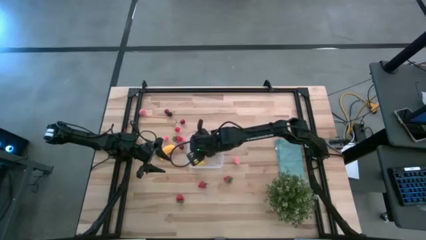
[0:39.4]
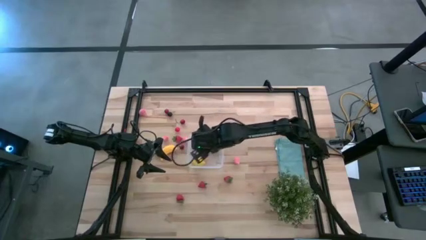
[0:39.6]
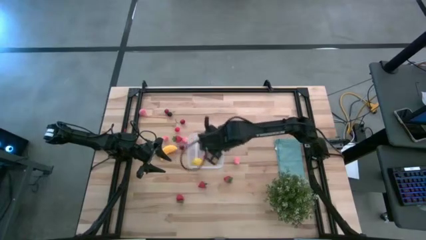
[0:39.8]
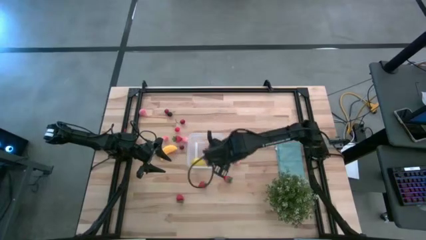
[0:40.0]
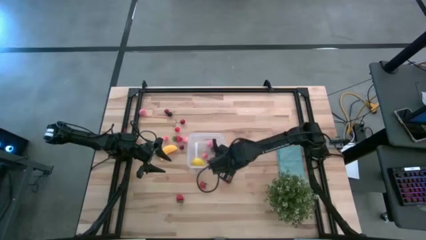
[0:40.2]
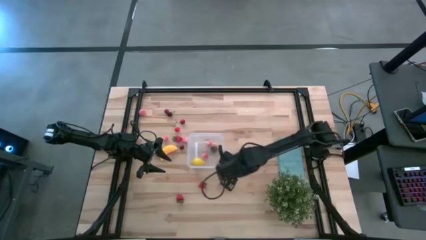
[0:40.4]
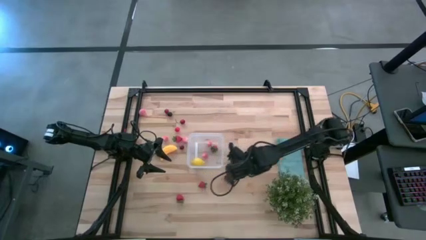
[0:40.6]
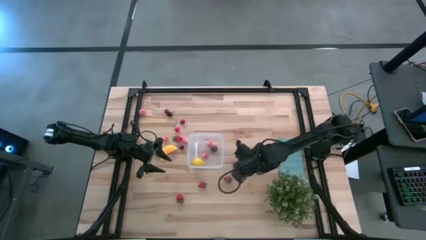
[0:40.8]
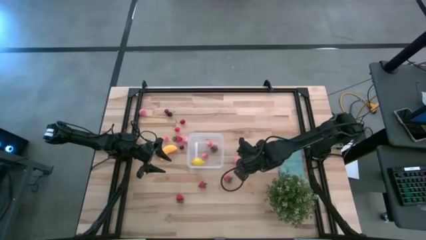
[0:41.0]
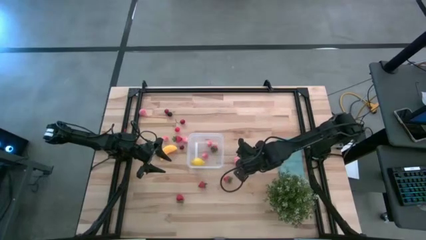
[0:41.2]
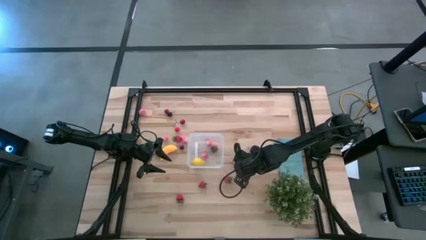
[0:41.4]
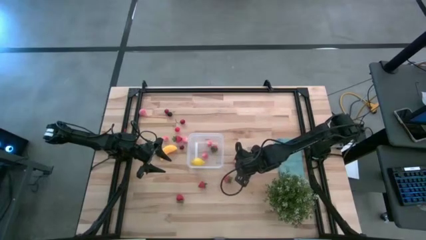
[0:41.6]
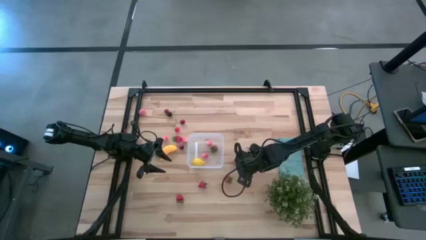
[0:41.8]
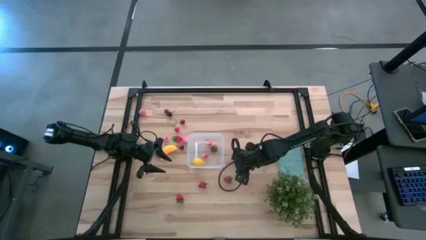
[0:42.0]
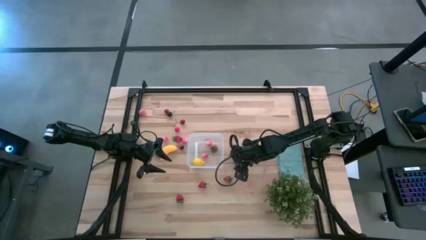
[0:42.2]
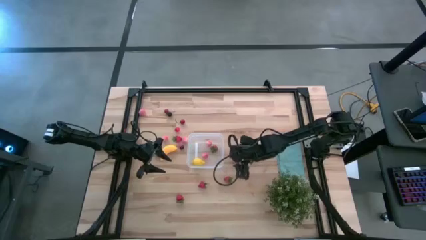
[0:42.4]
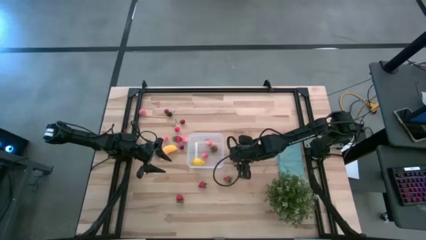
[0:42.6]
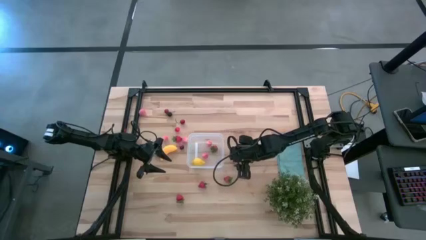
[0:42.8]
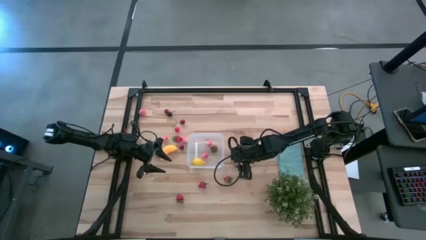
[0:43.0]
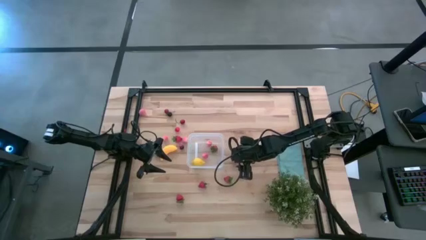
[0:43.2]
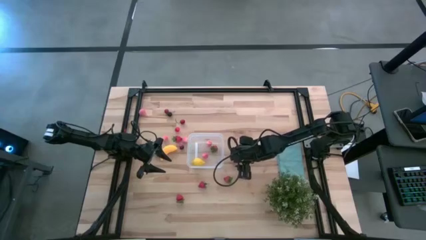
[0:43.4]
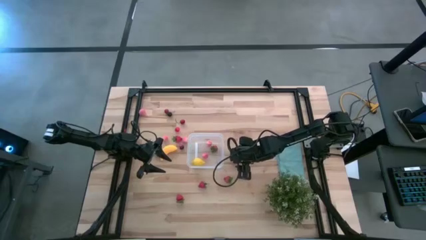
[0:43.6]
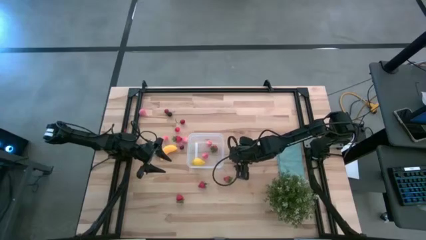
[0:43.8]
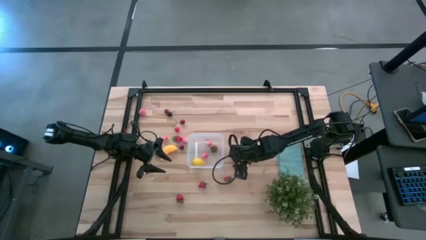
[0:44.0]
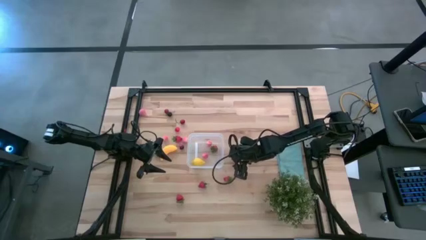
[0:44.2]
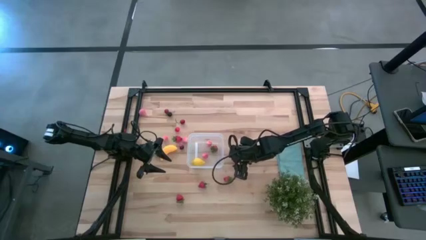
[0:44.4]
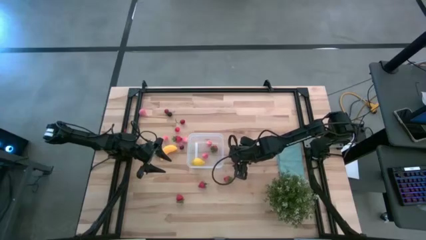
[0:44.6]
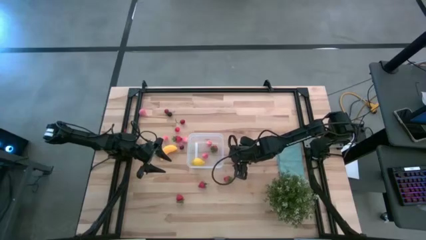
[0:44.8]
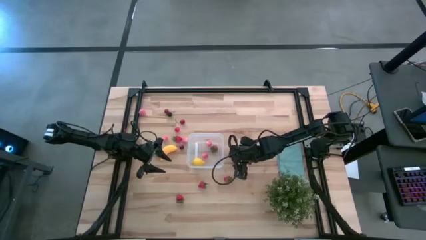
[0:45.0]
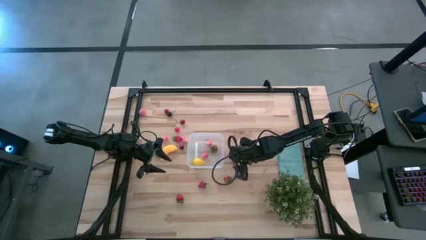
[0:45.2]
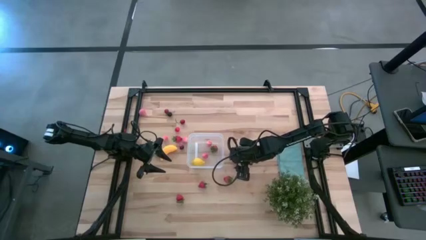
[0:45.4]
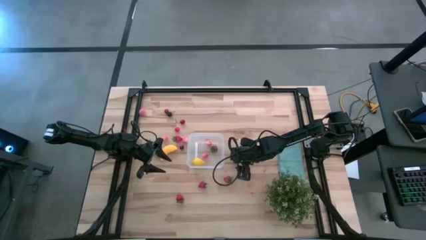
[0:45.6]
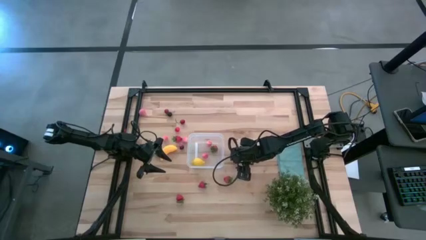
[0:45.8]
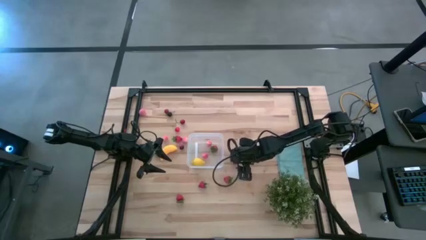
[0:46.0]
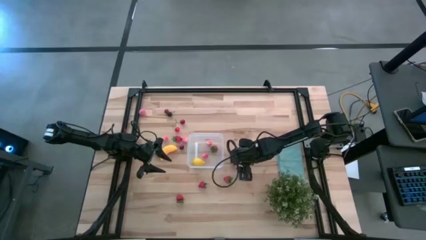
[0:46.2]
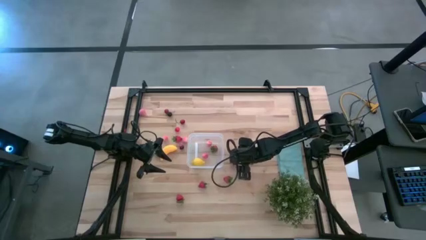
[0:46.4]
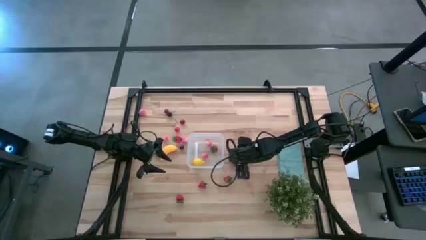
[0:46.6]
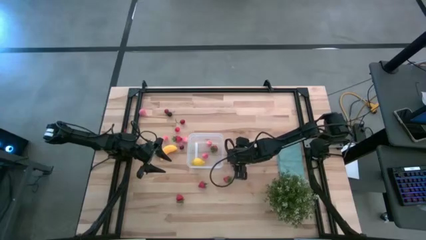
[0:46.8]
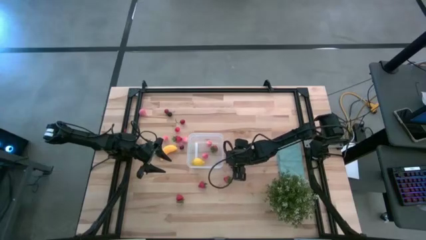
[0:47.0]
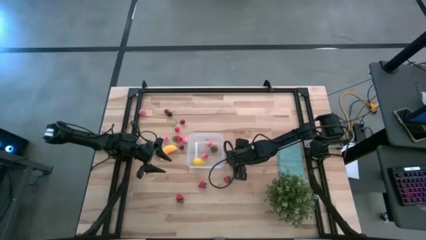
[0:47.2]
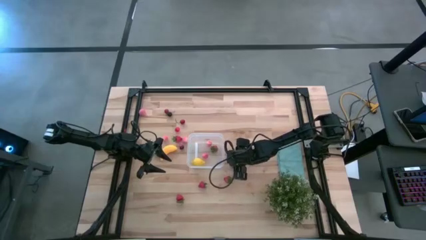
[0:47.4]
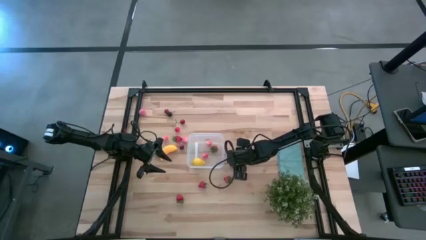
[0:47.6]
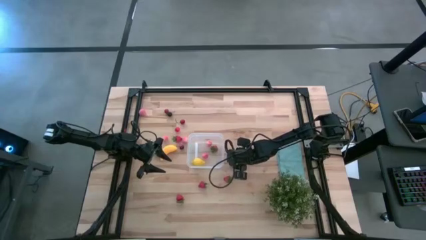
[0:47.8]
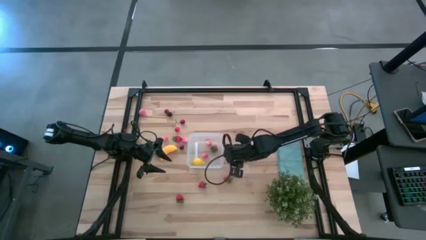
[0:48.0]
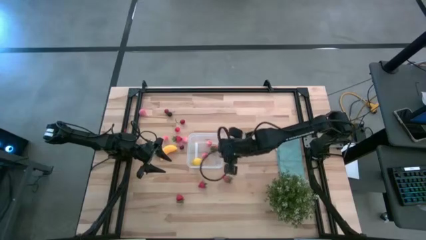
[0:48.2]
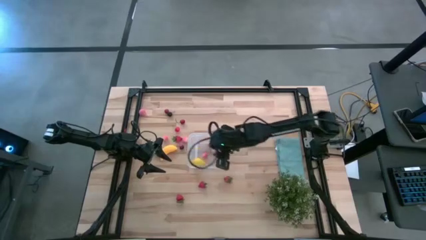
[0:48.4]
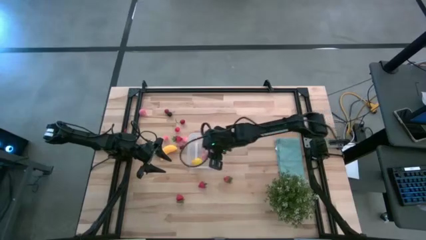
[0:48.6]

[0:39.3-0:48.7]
Task: Pick and placing Produce into tupperware
Put the peach into the transparent bin

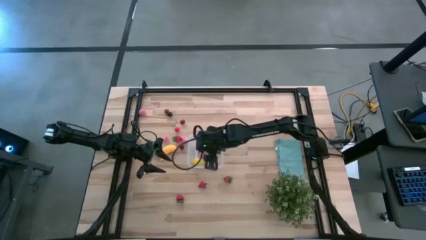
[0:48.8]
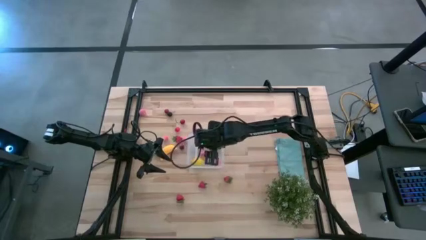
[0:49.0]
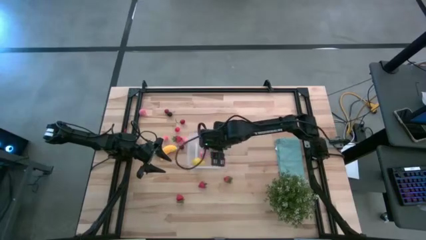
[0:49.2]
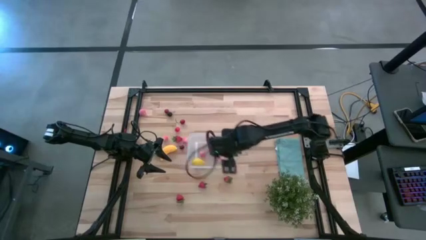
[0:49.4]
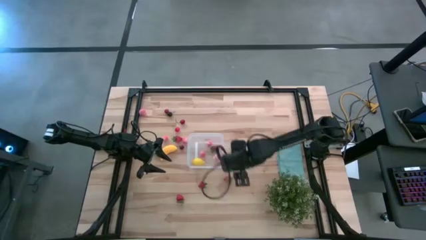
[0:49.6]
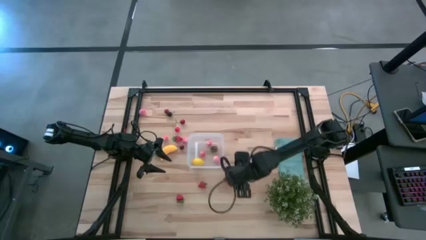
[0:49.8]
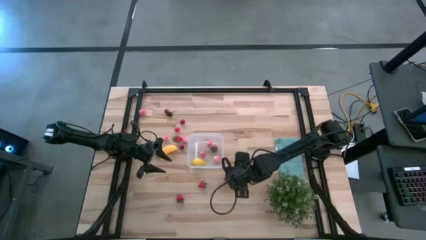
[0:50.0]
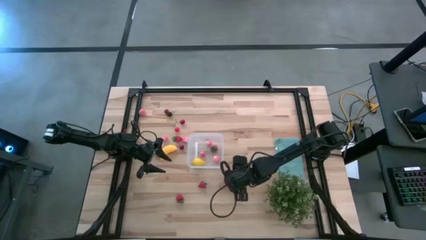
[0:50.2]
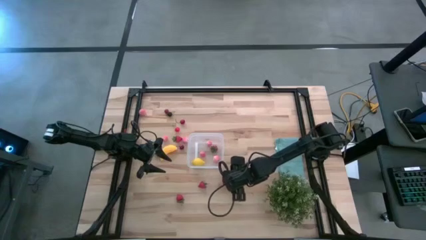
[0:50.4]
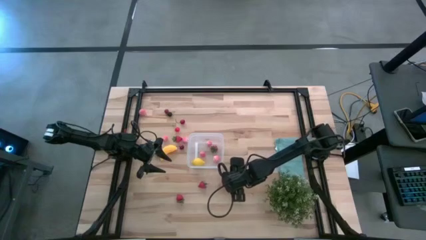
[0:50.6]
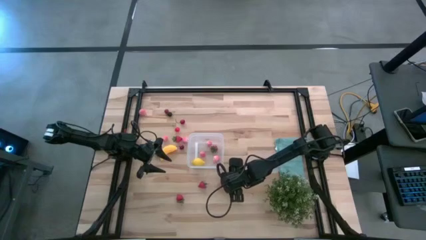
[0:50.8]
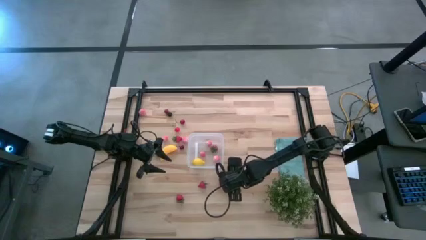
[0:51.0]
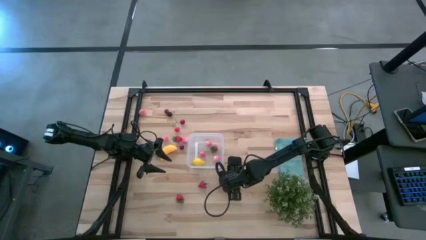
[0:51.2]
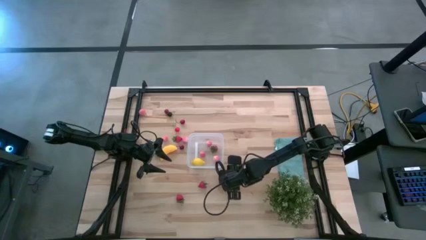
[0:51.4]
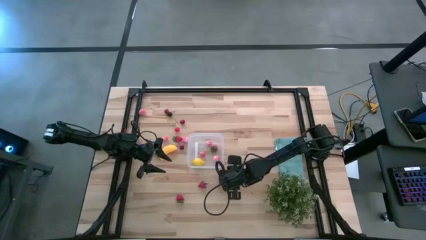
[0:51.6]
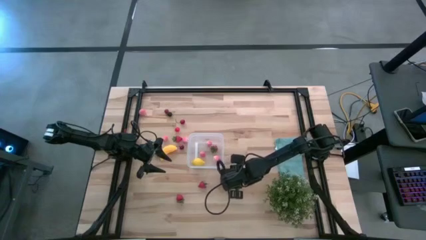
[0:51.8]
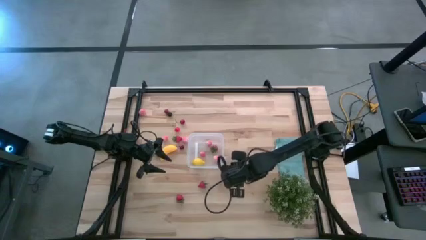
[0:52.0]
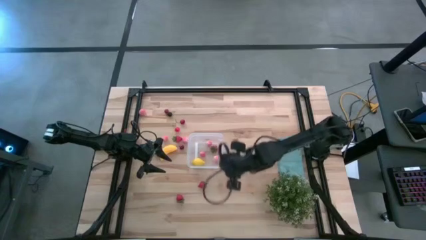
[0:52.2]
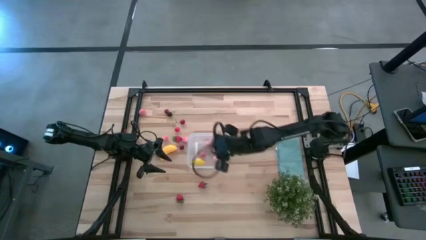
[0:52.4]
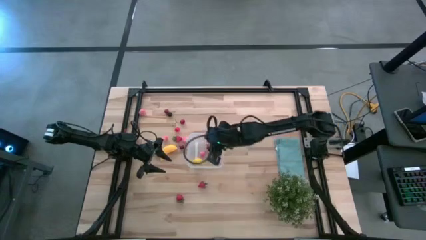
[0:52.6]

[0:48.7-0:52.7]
Put the strawberry into the transparent bin
